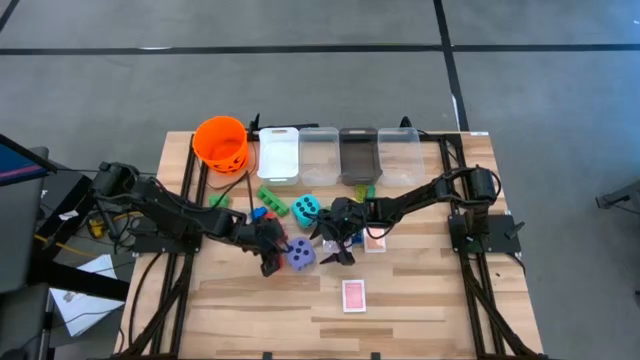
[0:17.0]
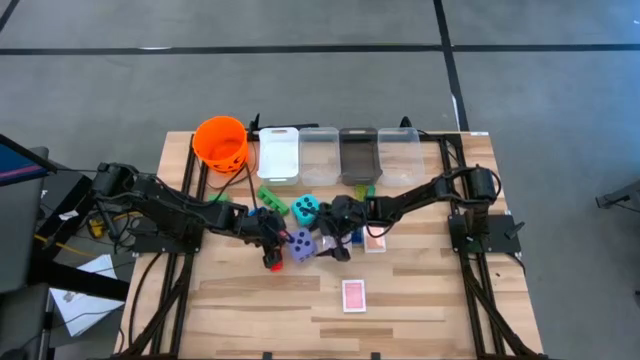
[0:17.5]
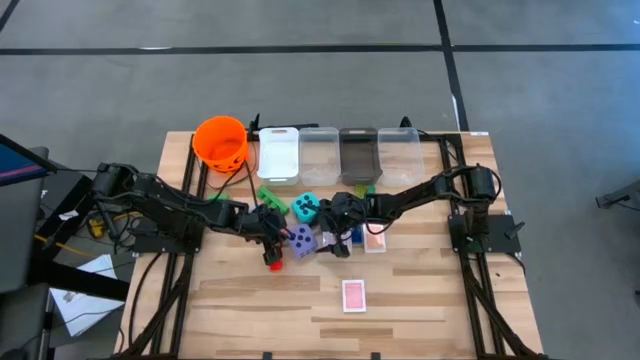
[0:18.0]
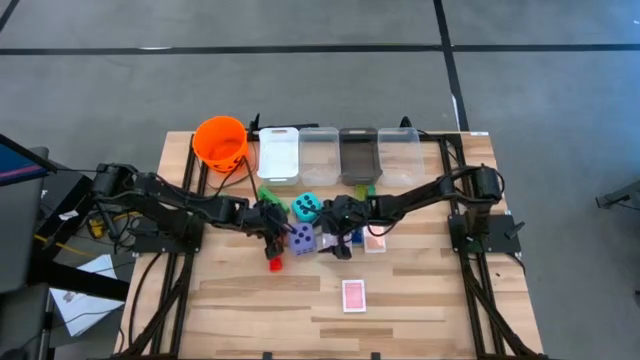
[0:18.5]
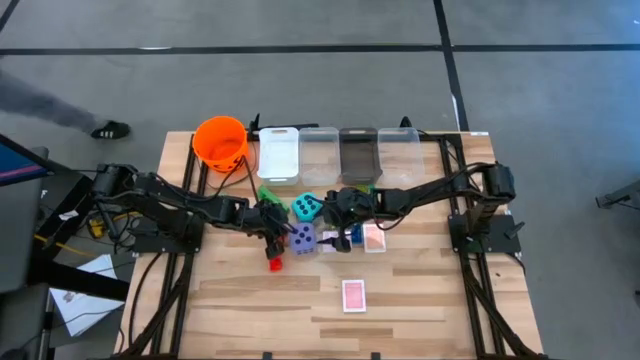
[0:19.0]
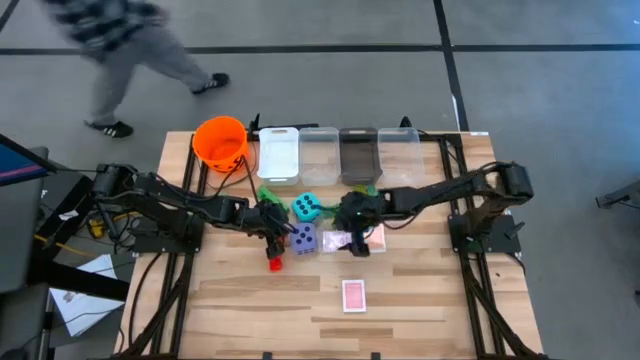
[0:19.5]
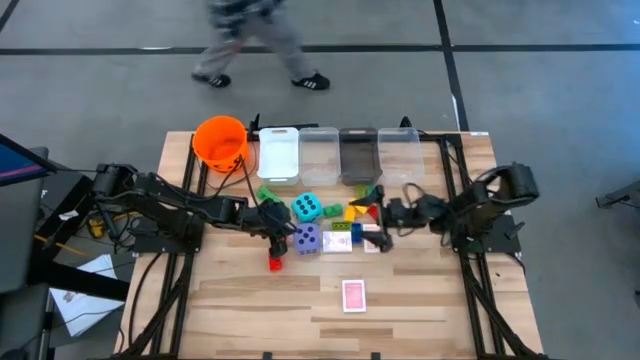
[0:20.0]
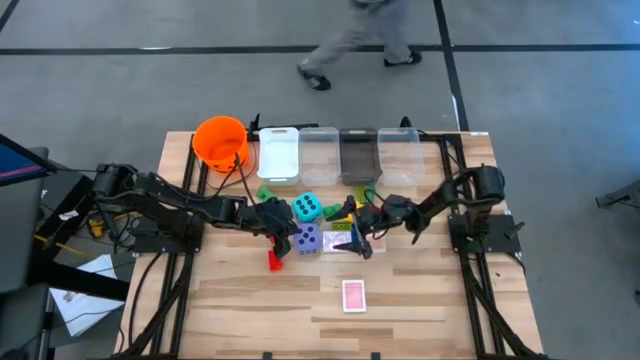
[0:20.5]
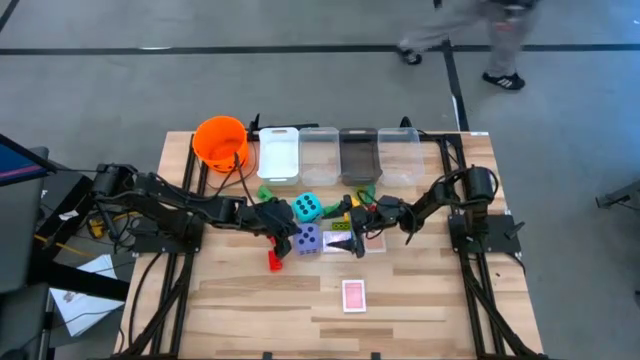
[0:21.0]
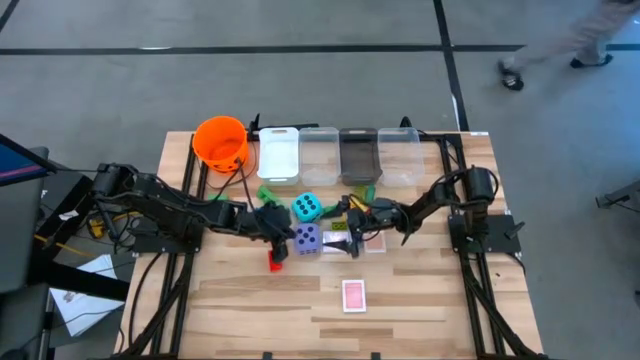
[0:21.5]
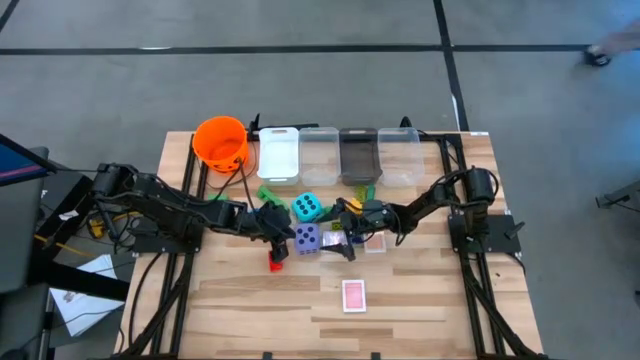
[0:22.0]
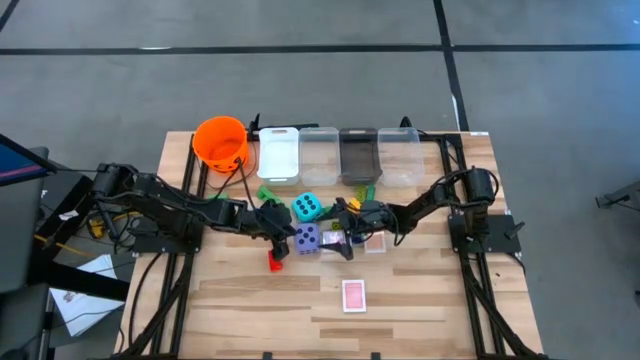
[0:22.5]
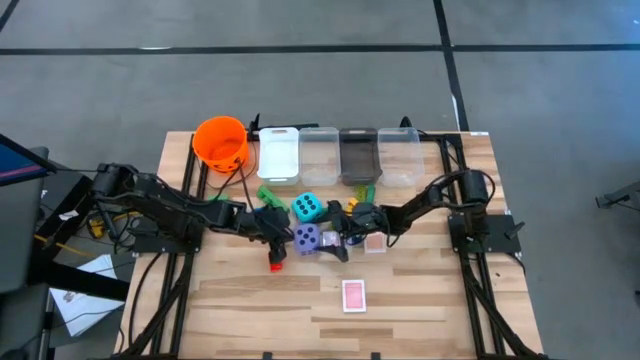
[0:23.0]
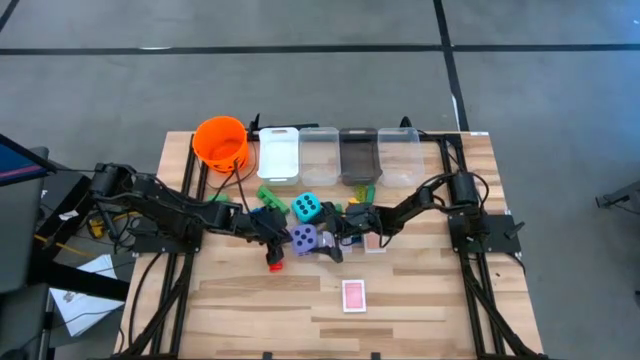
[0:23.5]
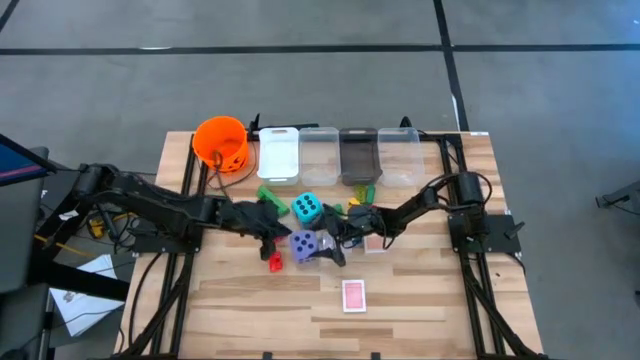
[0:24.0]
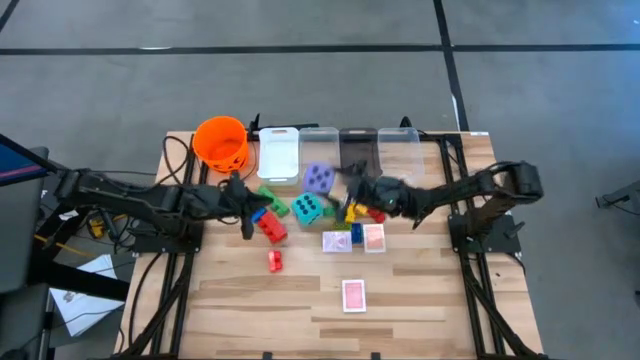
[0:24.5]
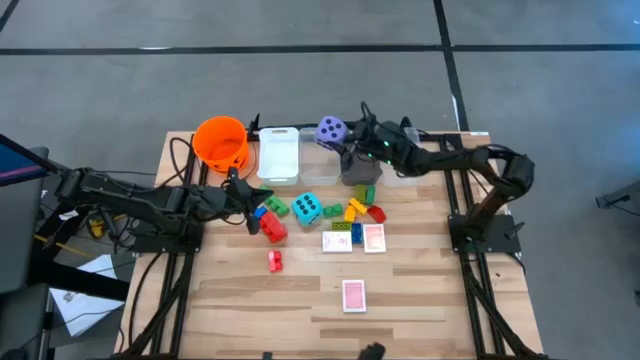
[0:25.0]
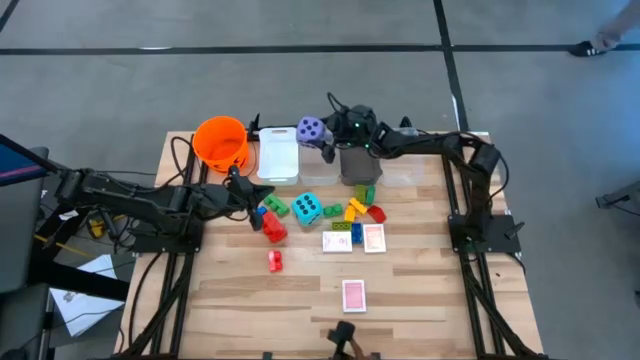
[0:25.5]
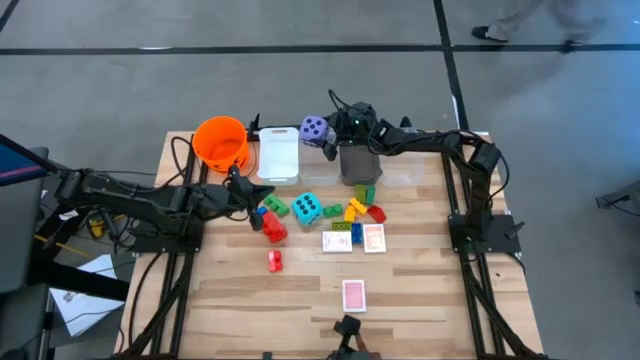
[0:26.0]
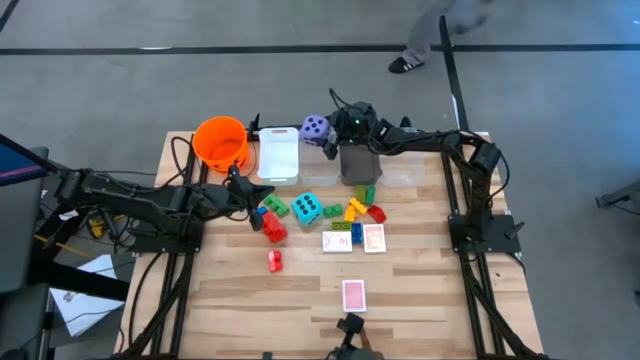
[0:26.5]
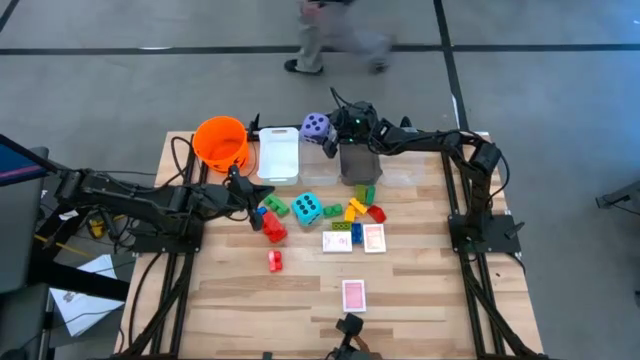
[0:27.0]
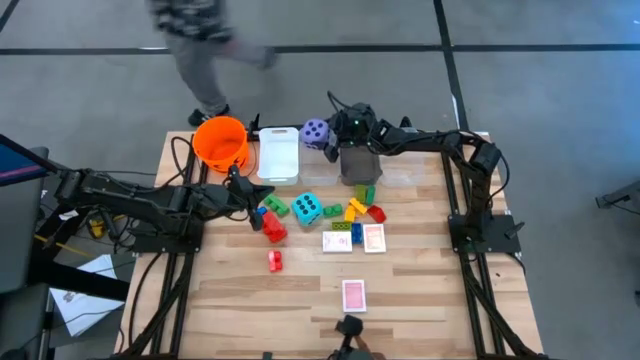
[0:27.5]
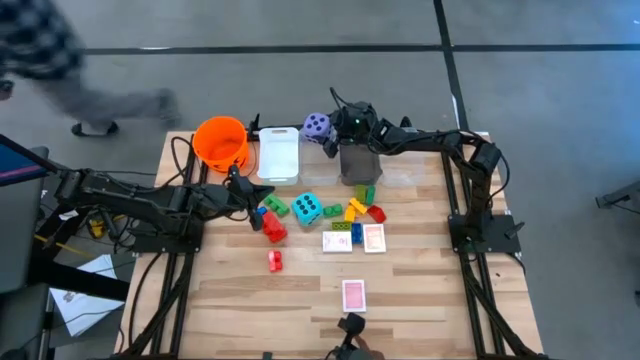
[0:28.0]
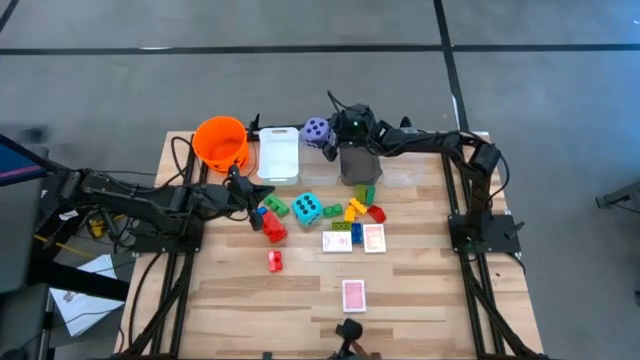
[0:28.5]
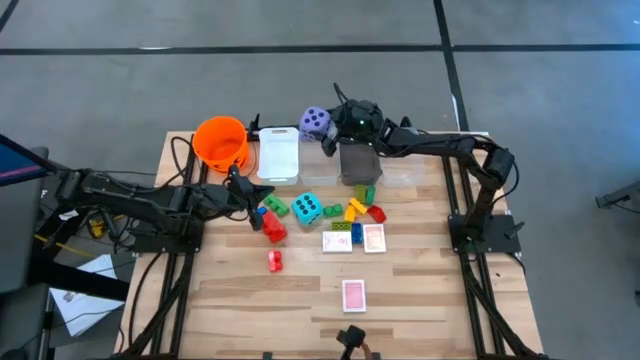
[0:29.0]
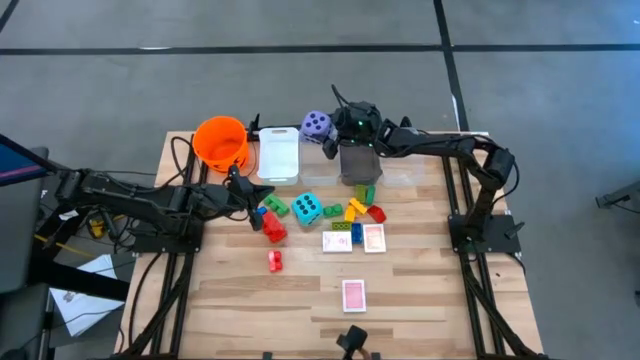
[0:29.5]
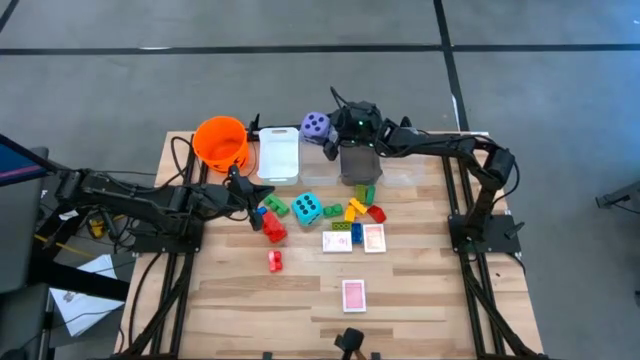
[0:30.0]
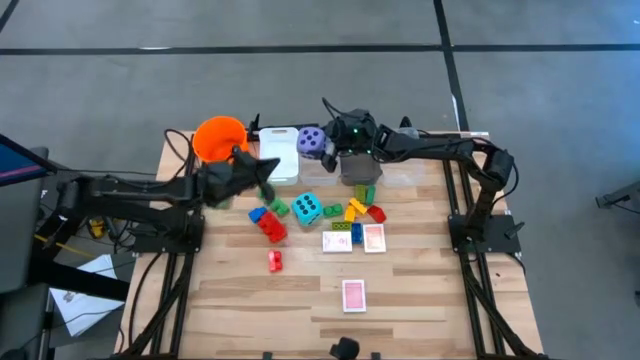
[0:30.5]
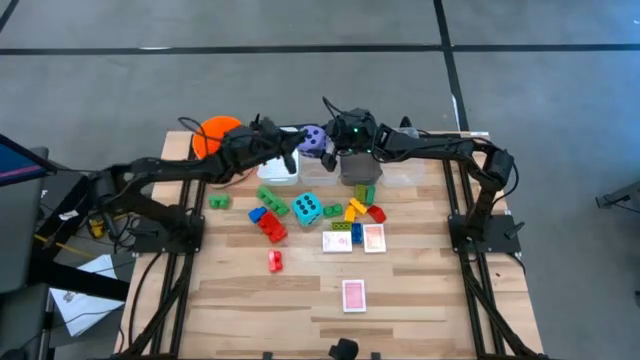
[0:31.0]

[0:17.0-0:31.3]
Task: Pick & Place Toys
Put the purple dice into the left transparent bin

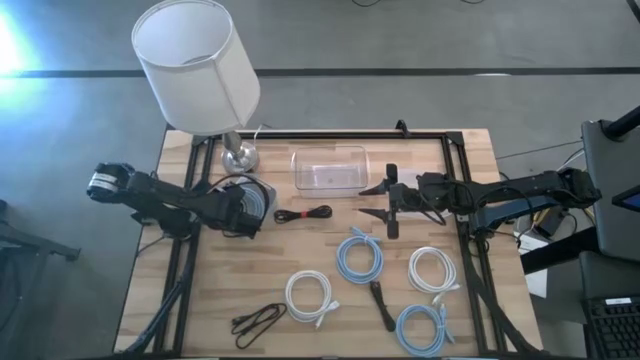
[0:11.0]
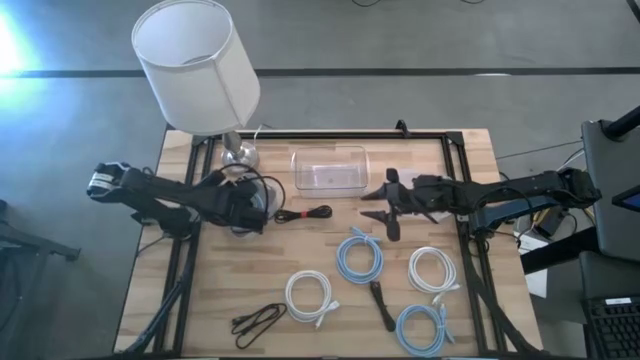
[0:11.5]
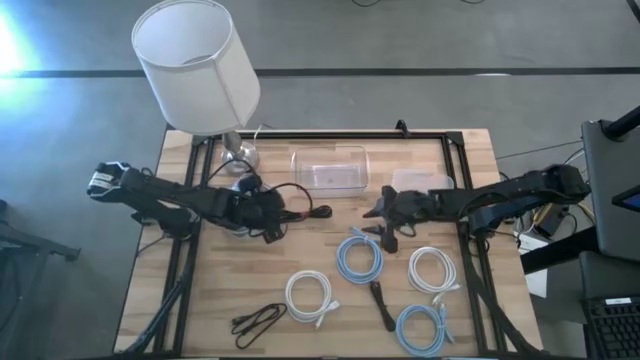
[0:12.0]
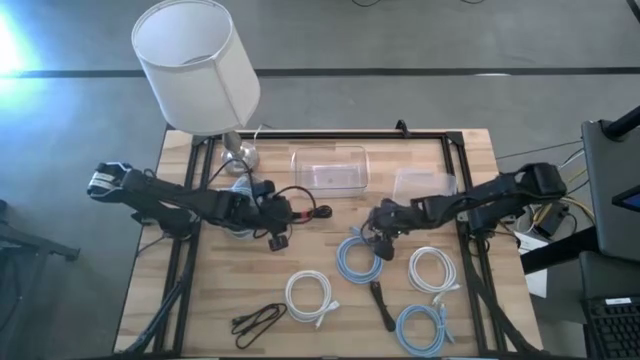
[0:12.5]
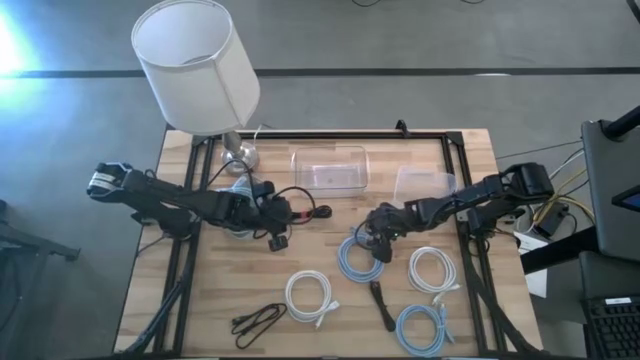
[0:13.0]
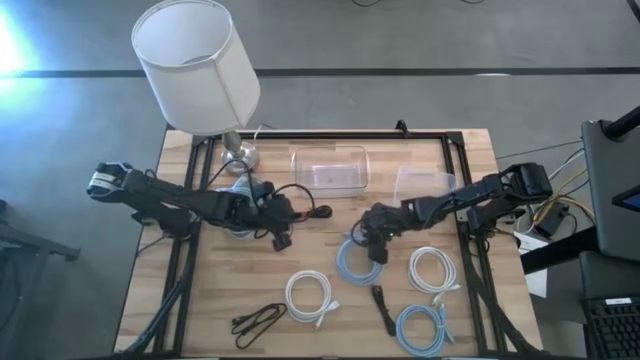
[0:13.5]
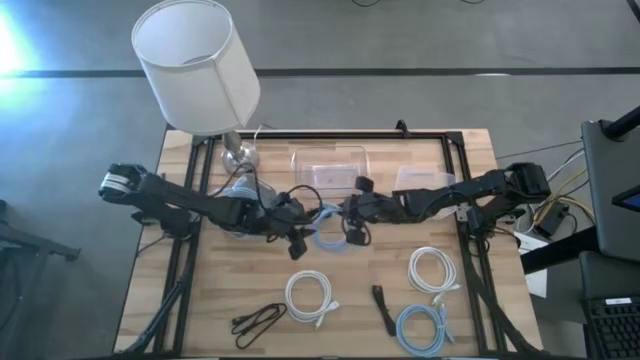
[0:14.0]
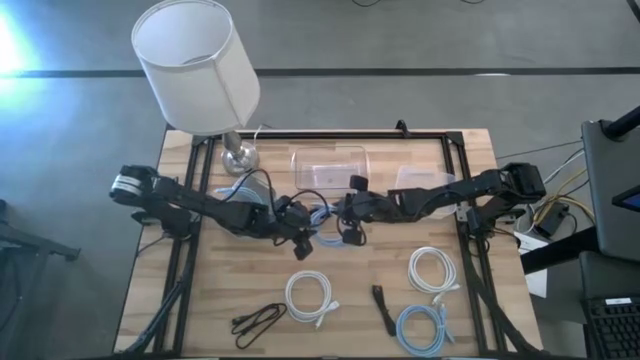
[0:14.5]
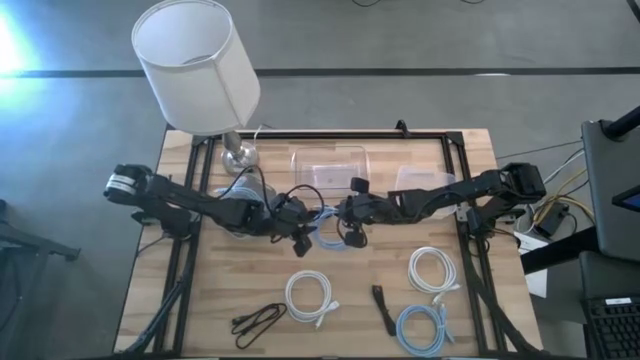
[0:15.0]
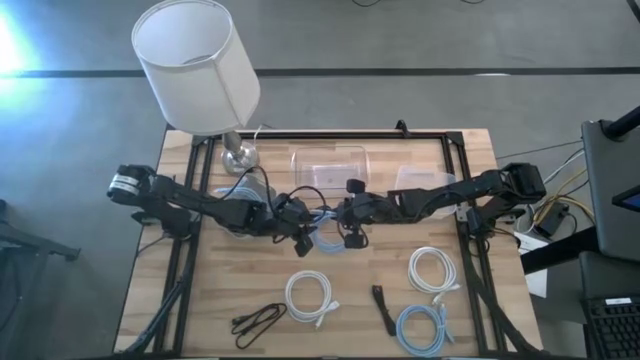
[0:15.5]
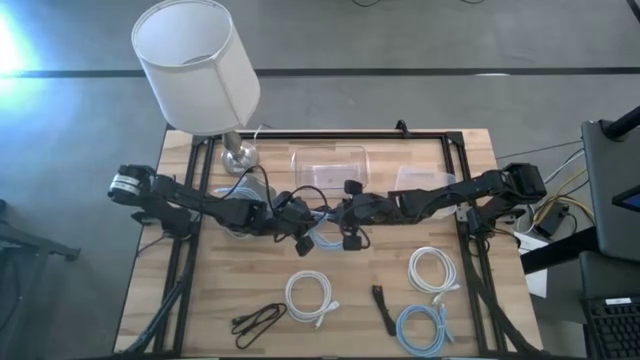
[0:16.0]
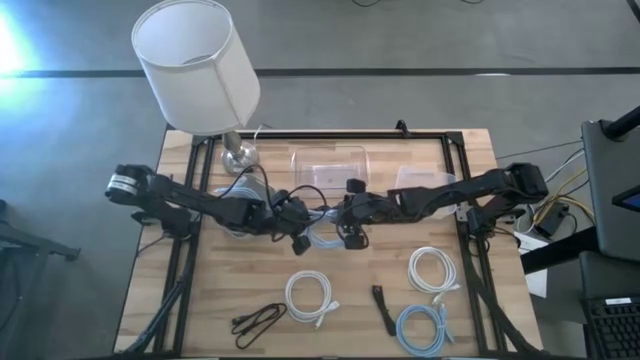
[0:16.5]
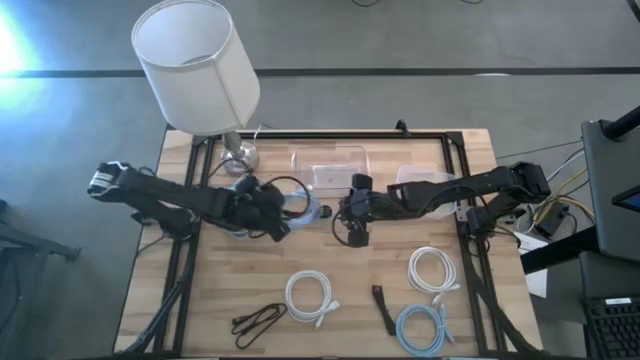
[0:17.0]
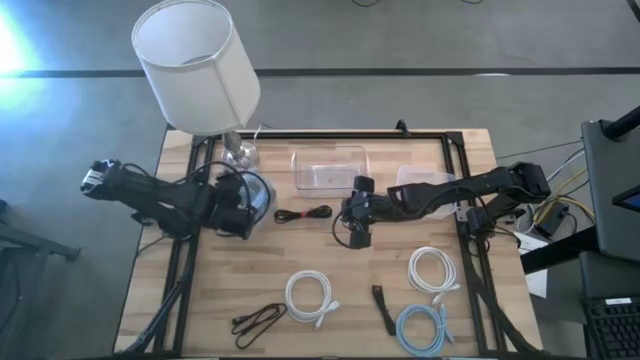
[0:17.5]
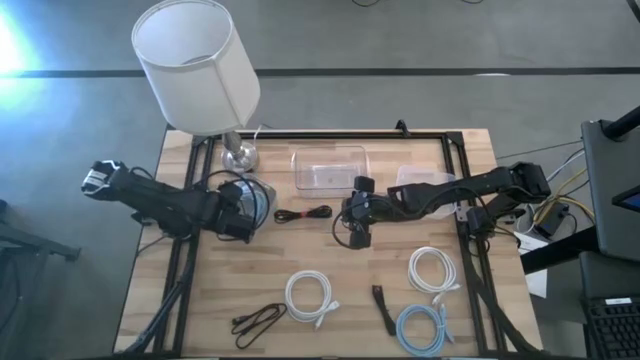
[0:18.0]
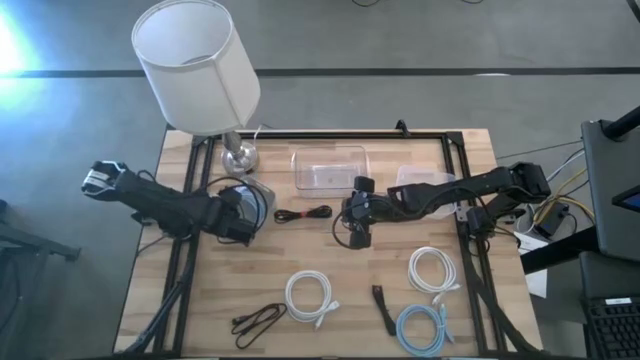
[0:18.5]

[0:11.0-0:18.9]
Task: Pick & Place USB Port
Put the top blue USB cable into the gray bin
